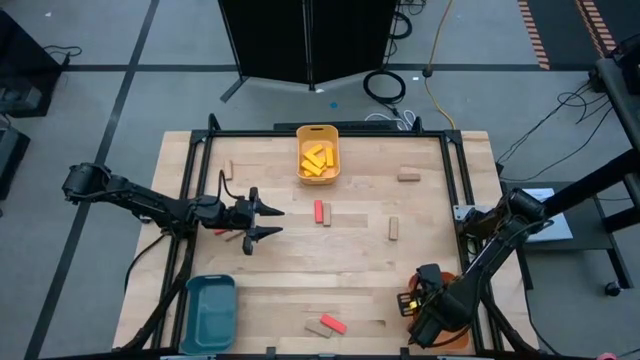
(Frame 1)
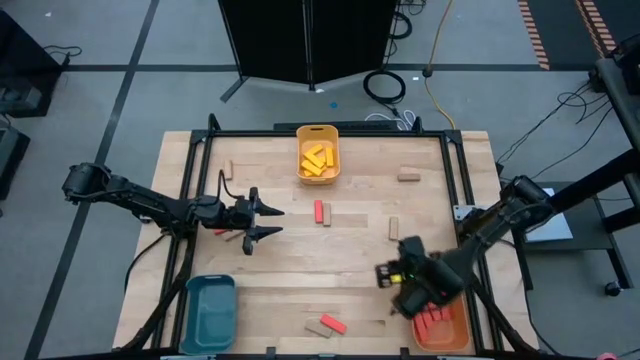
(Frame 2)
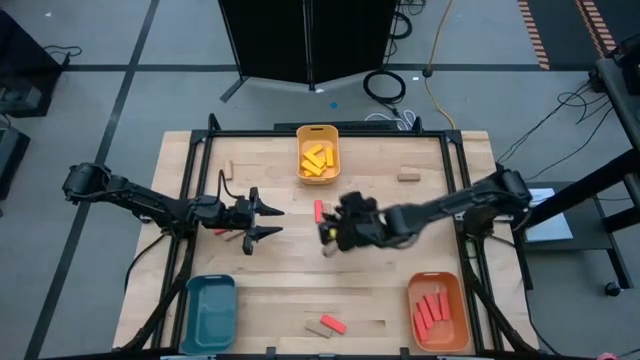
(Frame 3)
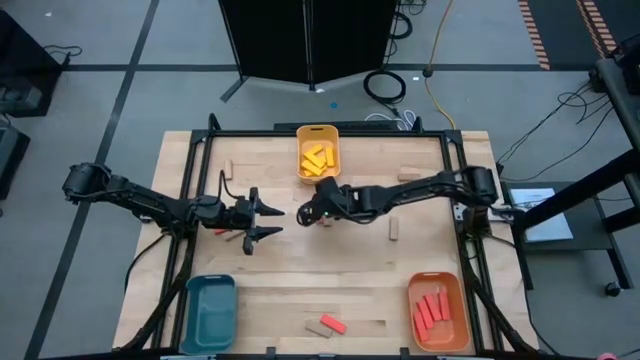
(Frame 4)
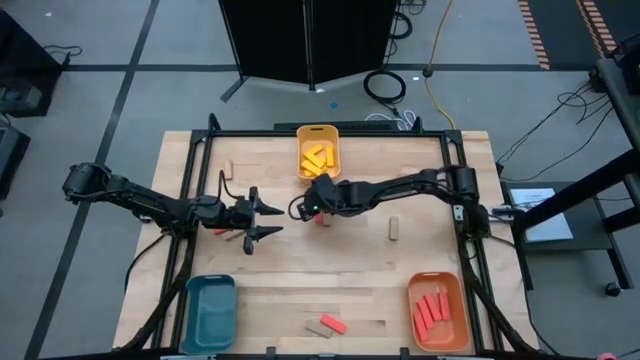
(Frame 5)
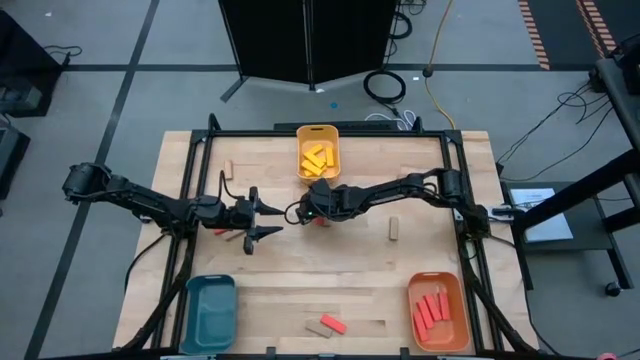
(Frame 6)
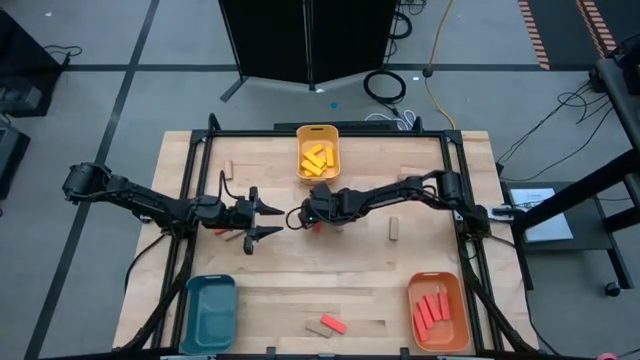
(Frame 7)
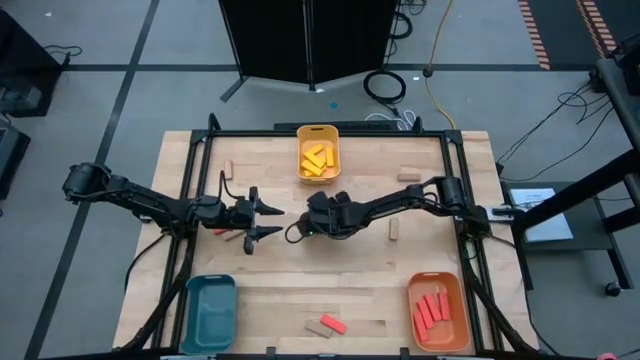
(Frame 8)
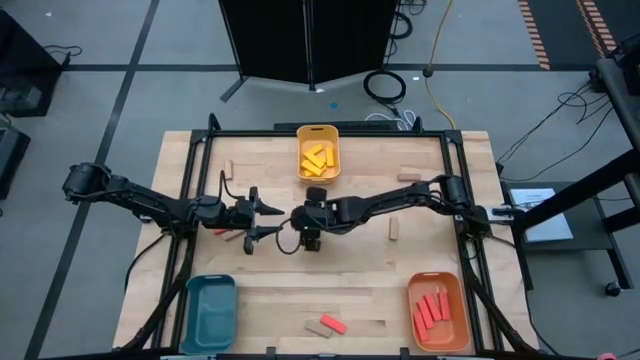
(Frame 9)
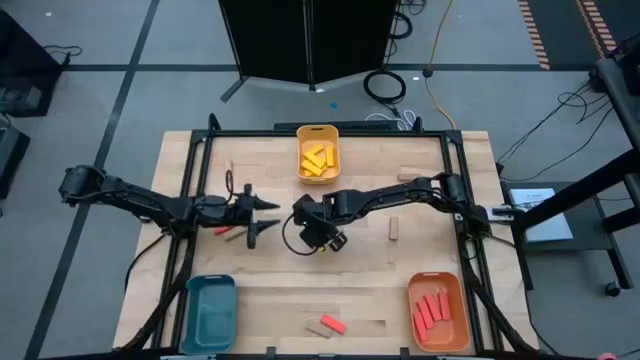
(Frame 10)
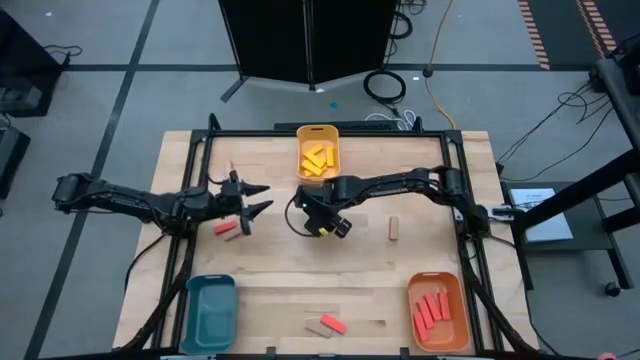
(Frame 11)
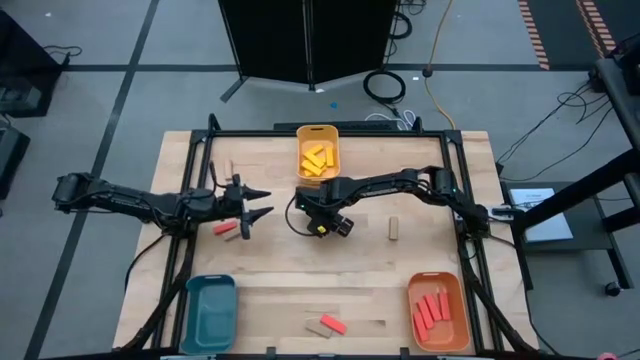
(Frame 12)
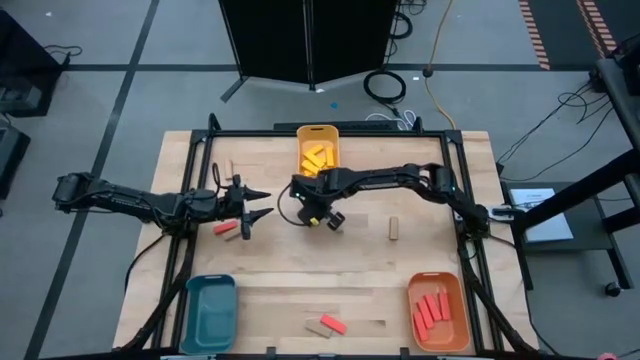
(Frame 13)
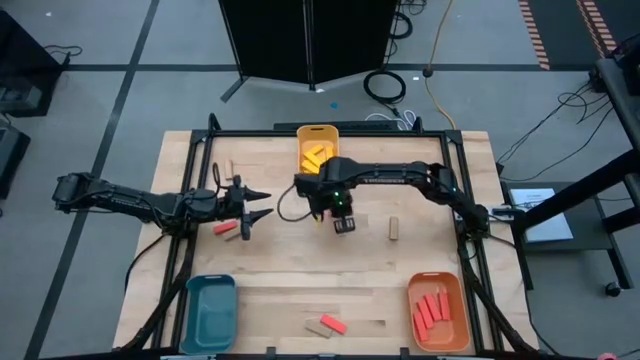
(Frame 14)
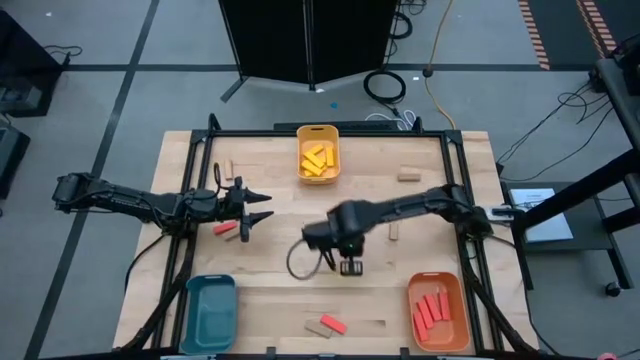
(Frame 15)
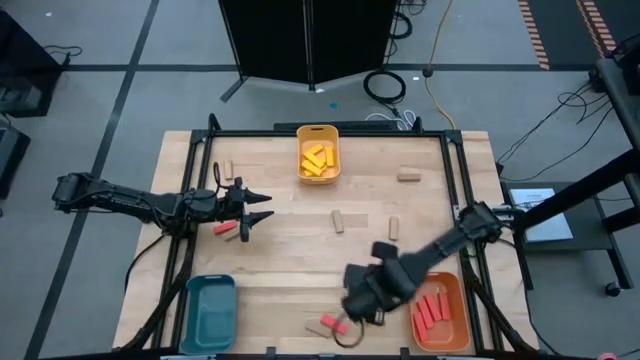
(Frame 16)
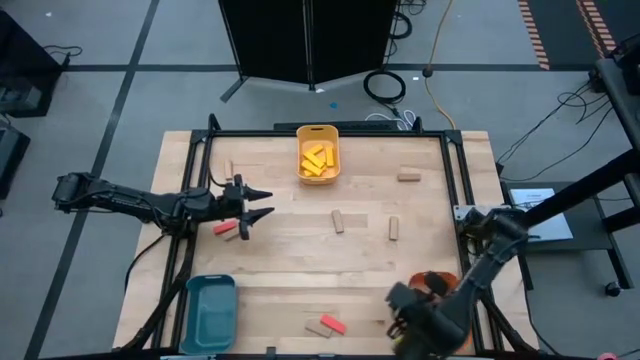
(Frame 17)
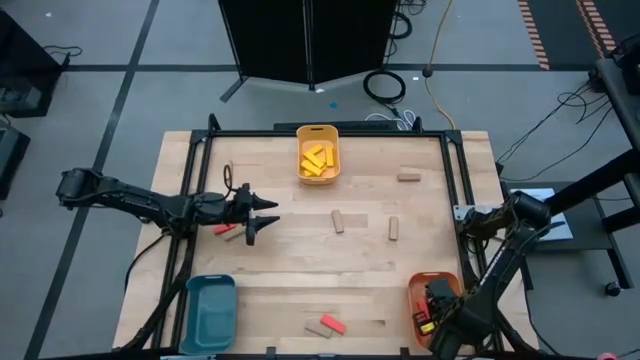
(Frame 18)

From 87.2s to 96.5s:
Task: Sort blocks
Put the orange block into the orange bin

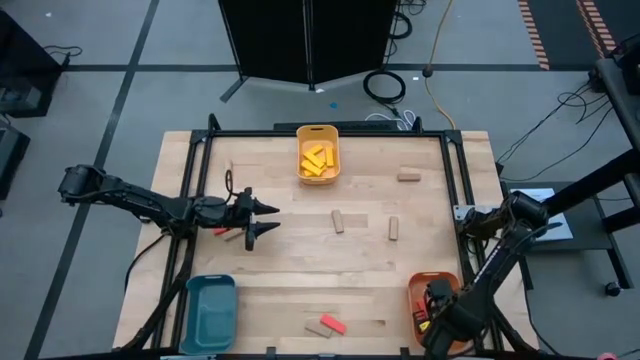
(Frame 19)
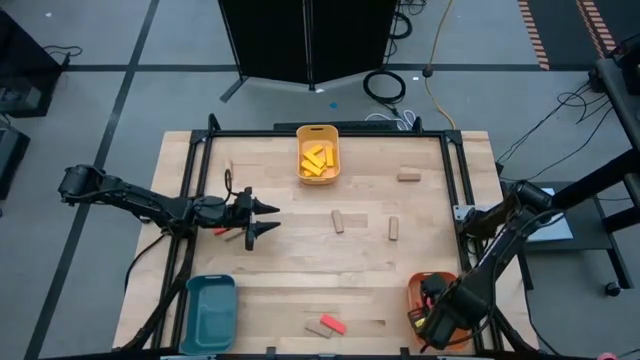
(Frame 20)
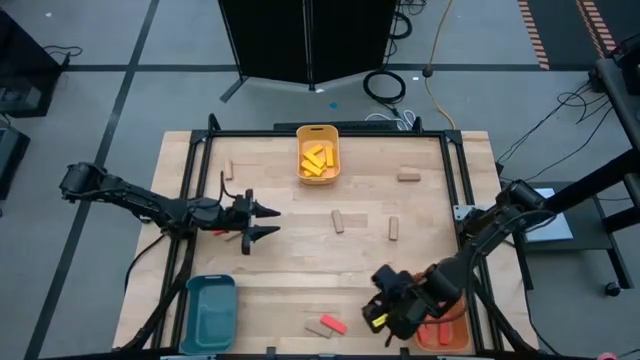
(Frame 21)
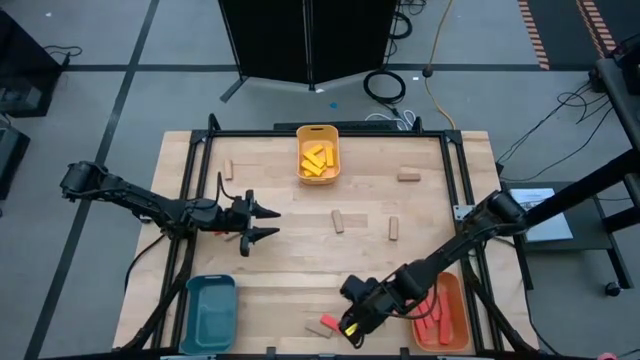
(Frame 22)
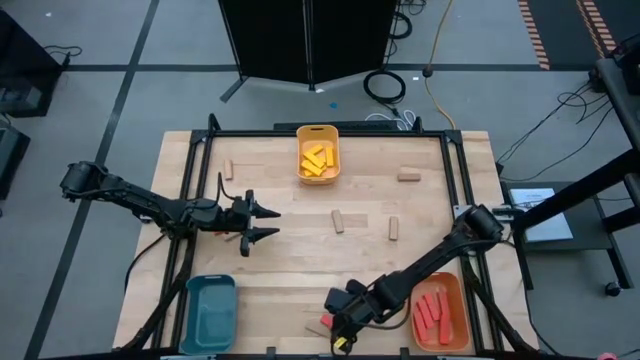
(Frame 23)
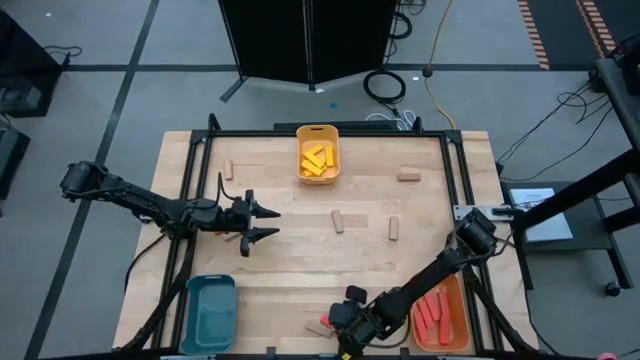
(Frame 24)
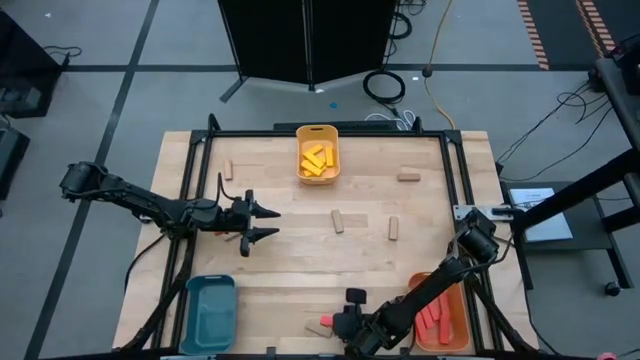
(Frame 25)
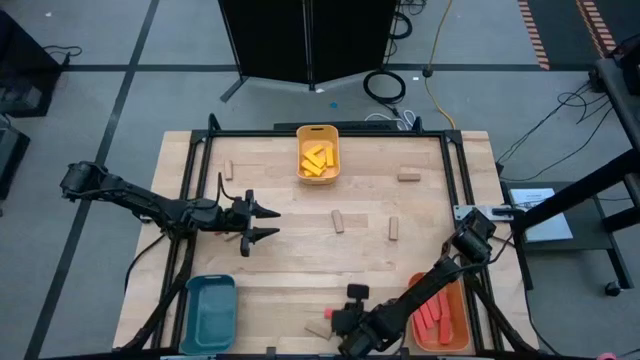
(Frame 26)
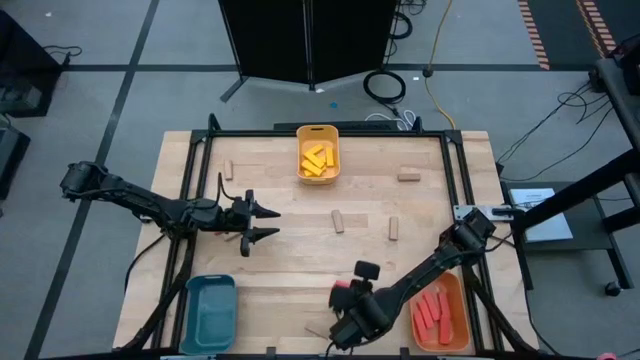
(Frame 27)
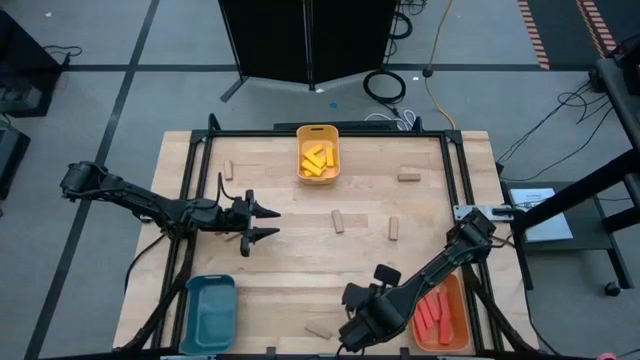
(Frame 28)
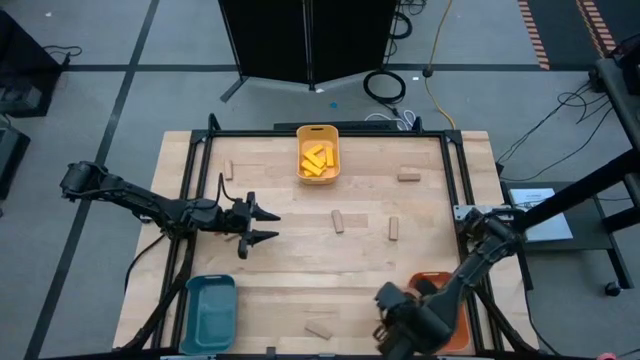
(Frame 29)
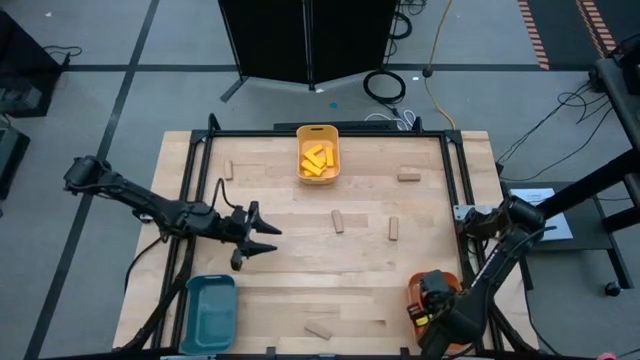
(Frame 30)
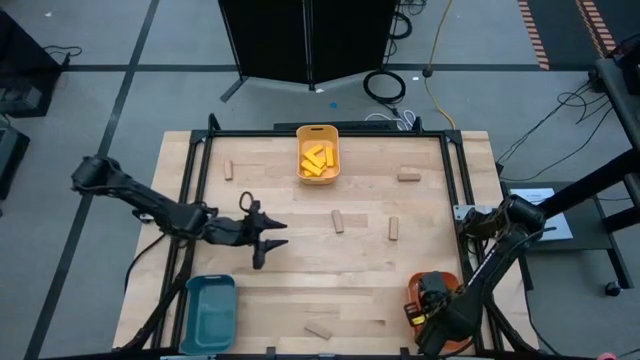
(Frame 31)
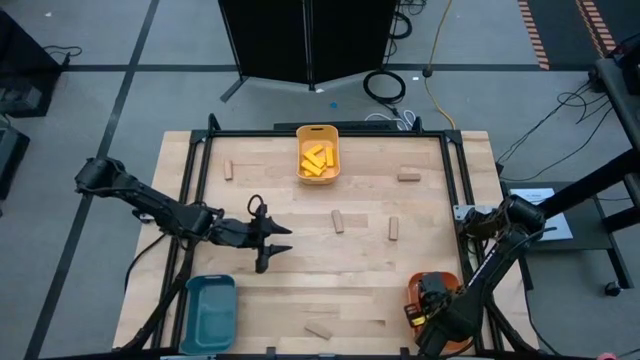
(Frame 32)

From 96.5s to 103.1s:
Put the orange block into the orange bin

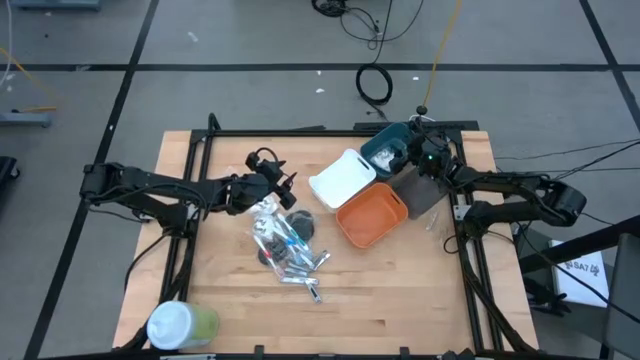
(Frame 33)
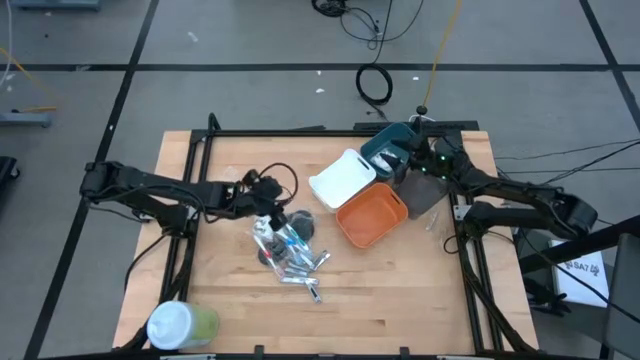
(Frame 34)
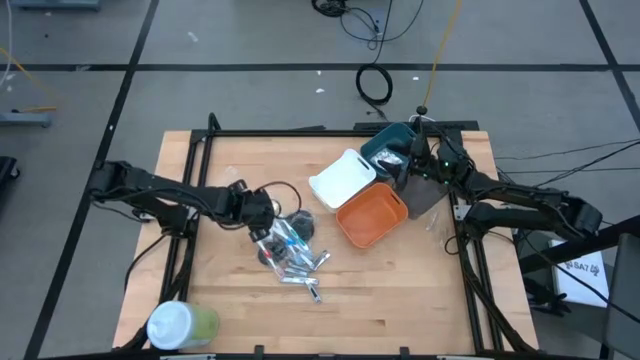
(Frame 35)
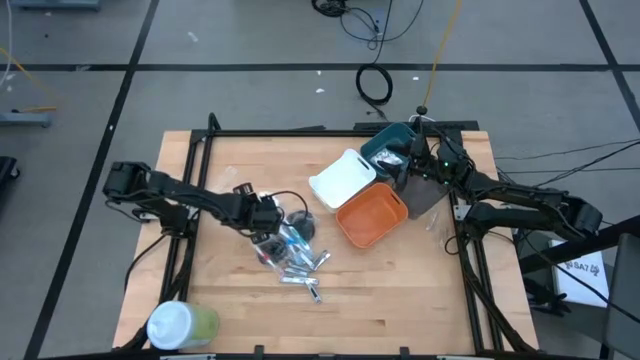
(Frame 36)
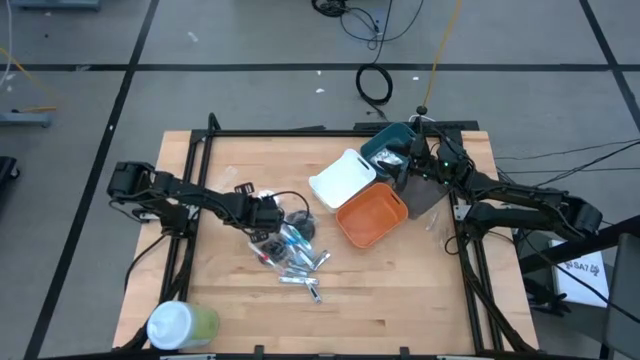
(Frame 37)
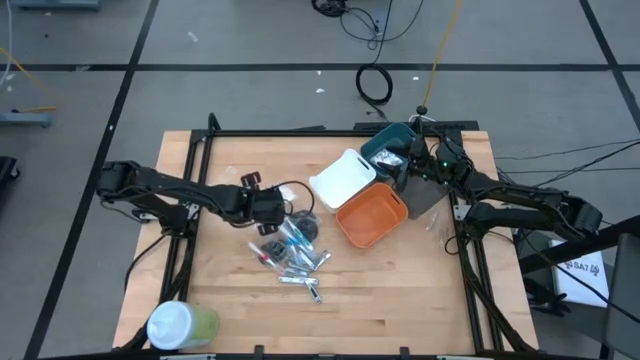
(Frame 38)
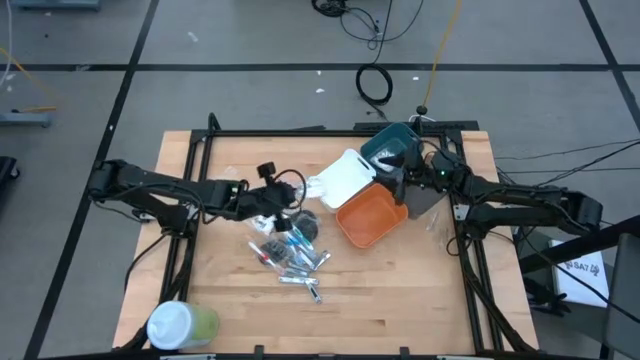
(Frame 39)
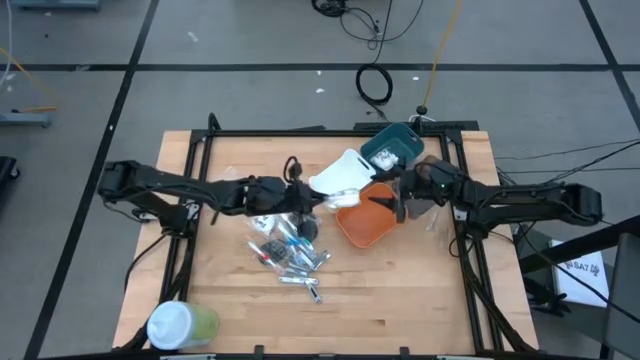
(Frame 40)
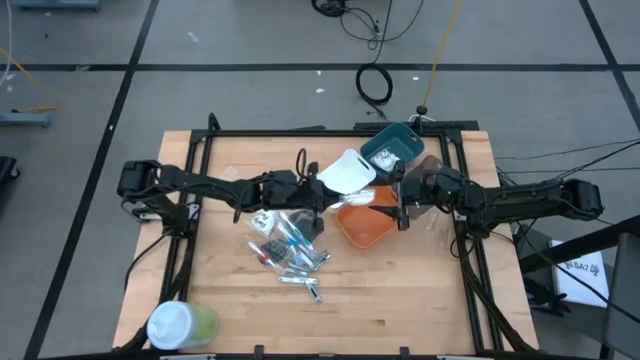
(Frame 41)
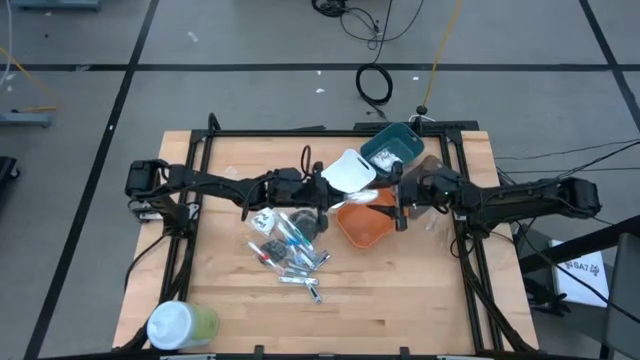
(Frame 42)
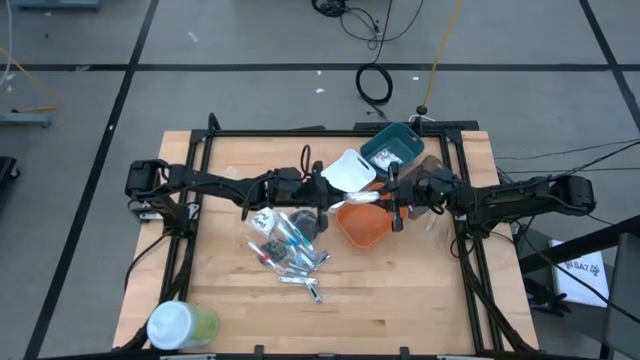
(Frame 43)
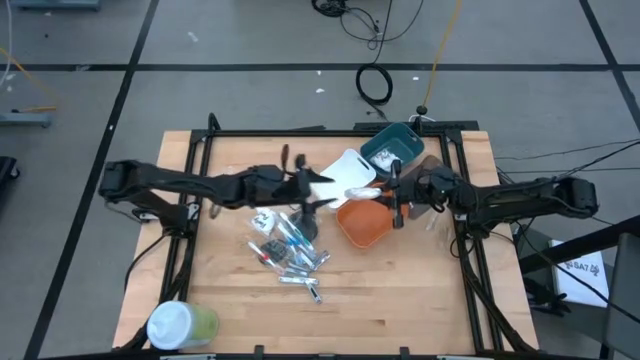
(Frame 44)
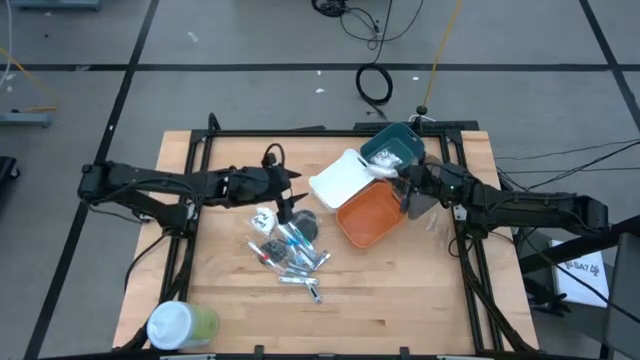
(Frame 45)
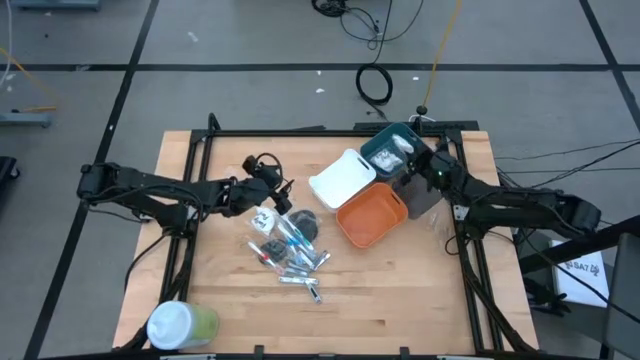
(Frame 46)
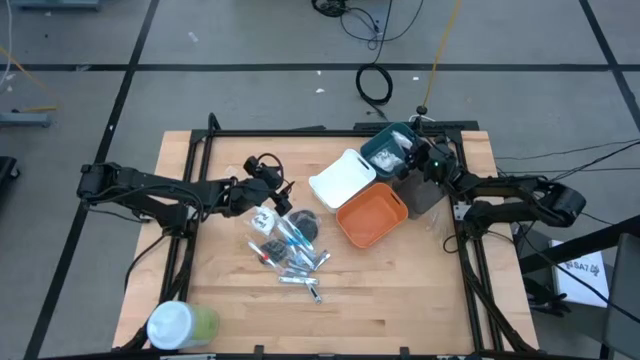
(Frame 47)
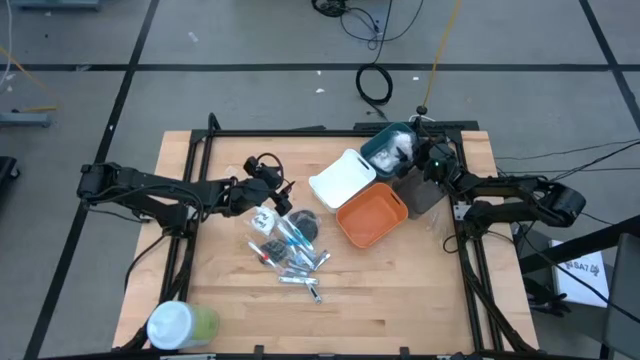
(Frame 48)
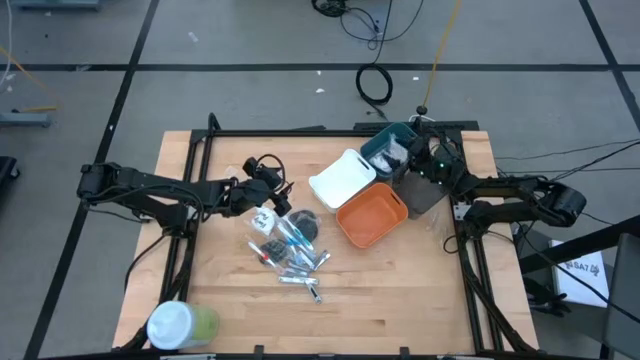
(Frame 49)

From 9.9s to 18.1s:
Task: Pick & Place Travel size toiletries
Put the white cotton pack into the blue bin
